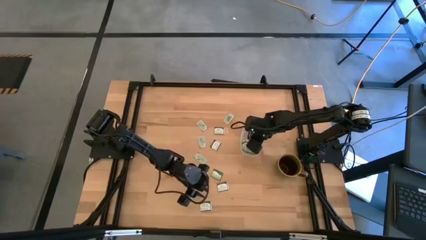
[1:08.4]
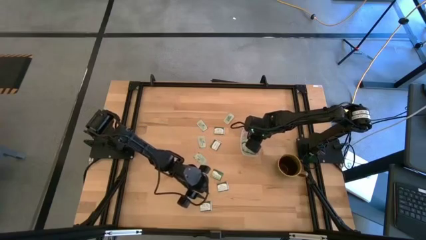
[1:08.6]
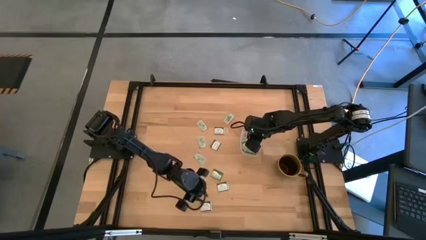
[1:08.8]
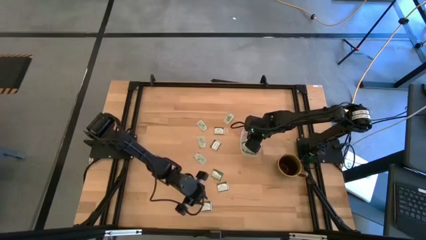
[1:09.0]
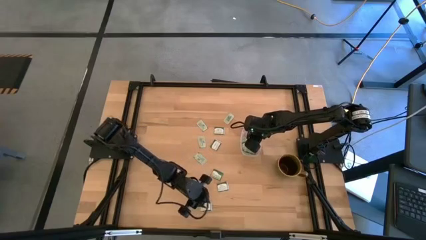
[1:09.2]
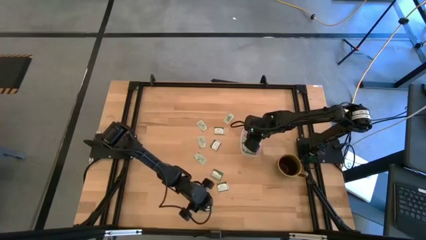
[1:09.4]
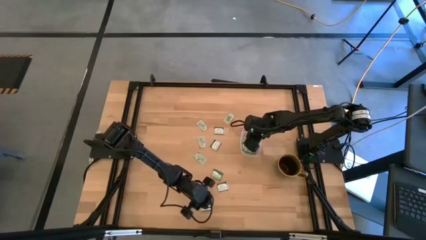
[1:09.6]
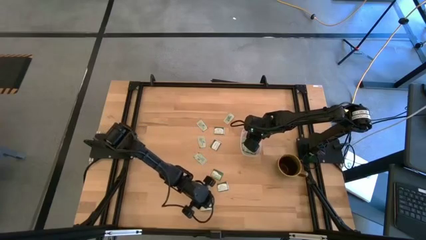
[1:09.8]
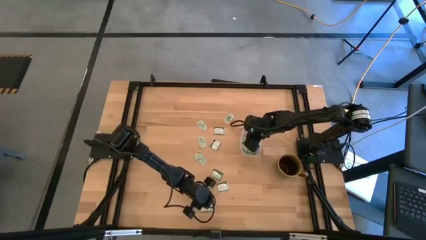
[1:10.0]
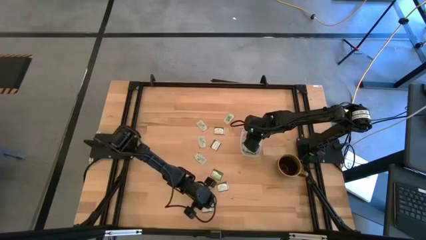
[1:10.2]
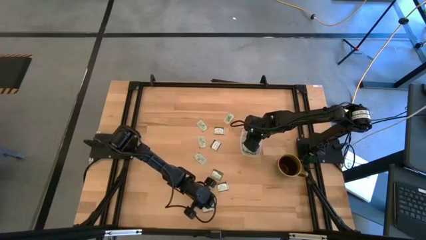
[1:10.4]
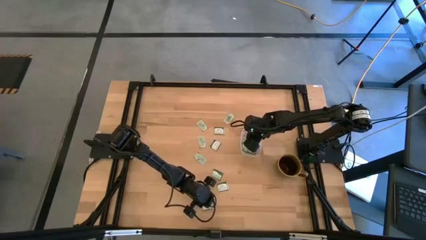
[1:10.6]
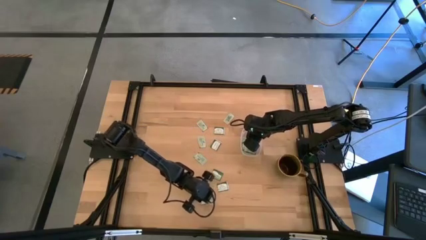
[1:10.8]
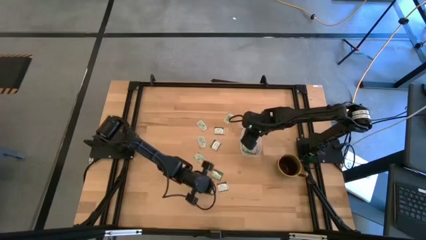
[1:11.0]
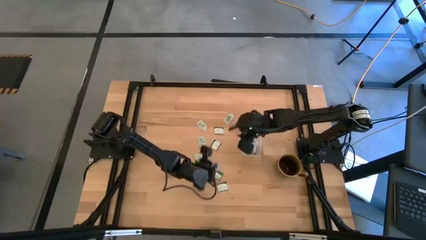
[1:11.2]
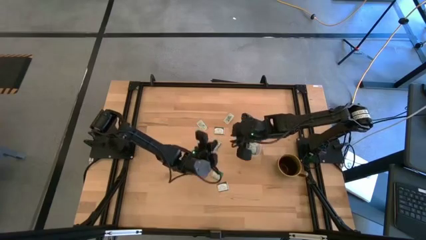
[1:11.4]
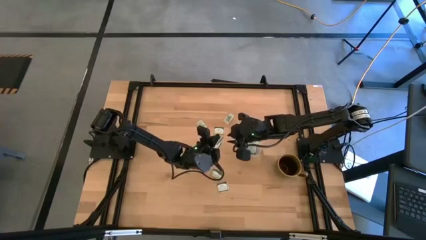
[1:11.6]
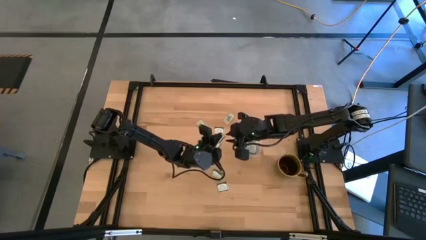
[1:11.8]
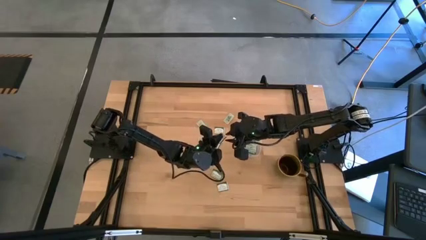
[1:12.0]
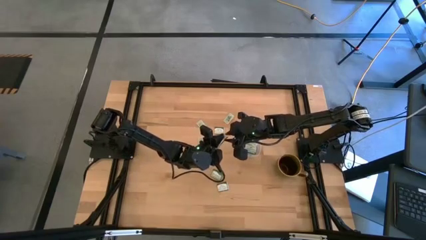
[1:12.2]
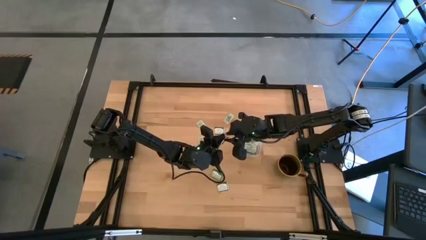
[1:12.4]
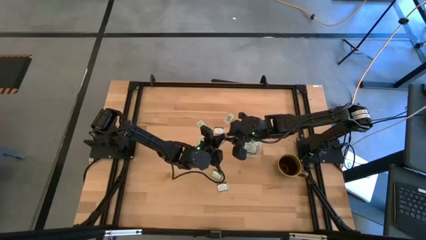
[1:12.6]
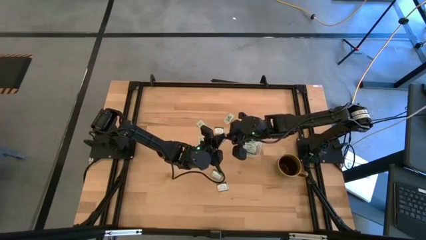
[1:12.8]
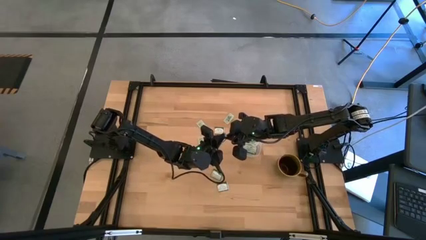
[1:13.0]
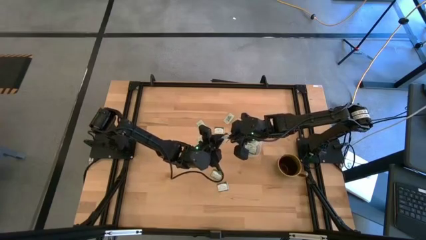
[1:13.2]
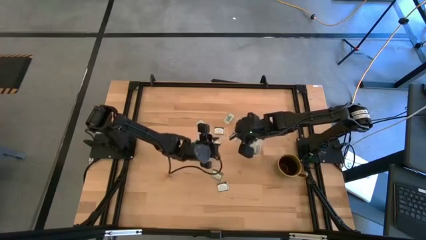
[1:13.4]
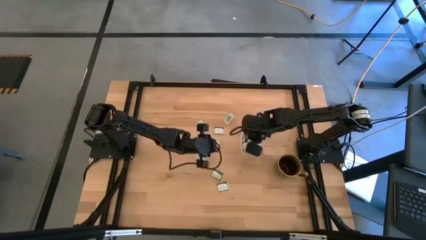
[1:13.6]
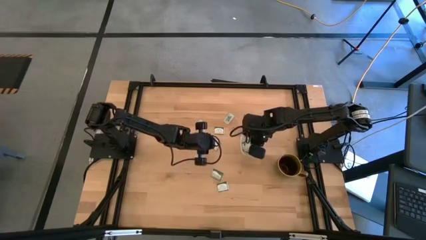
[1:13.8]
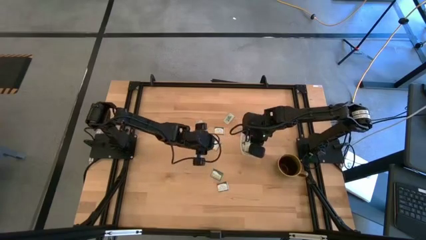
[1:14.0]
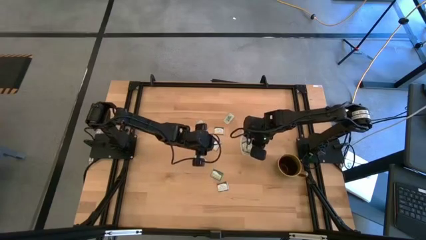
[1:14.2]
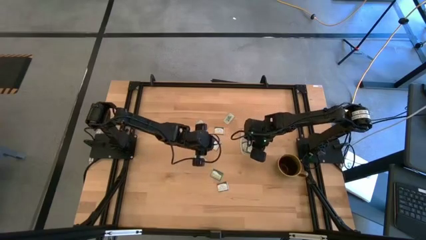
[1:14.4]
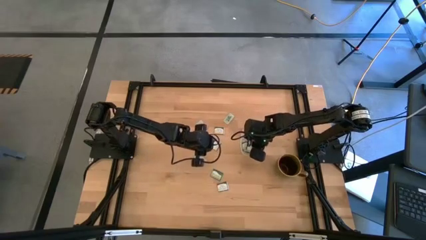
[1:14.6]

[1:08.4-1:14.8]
Task: Pick and place items into bin
Put the truvia packet into the transparent bin

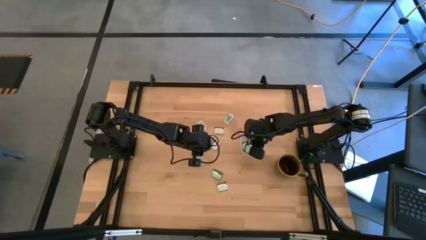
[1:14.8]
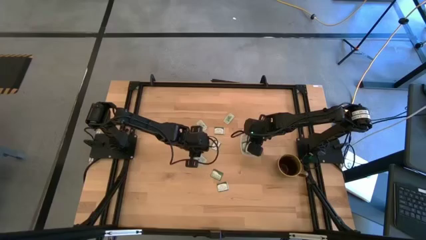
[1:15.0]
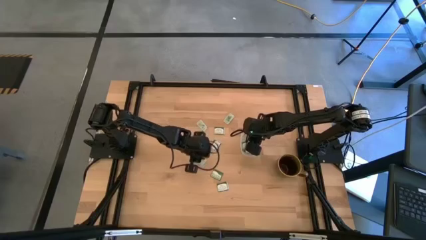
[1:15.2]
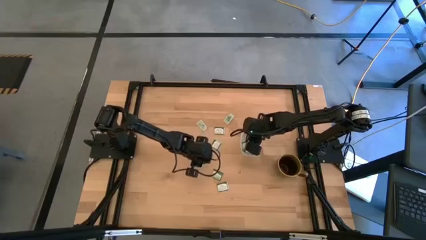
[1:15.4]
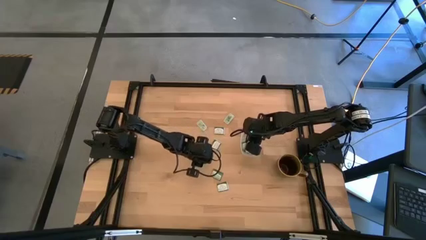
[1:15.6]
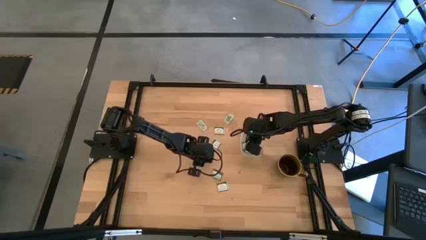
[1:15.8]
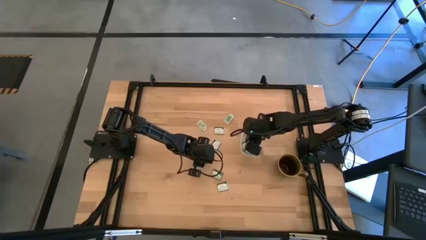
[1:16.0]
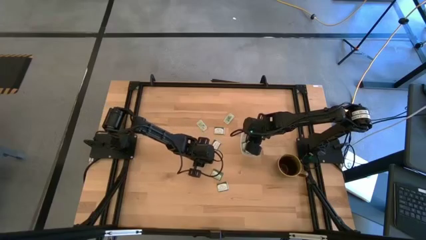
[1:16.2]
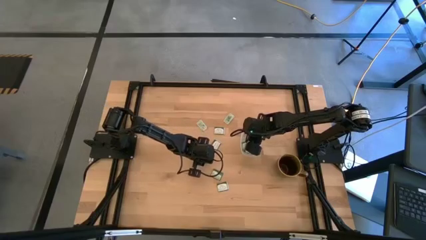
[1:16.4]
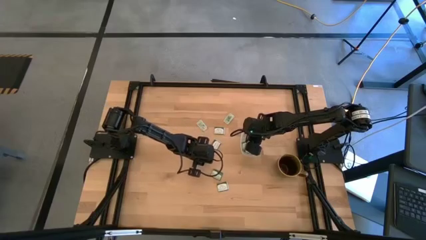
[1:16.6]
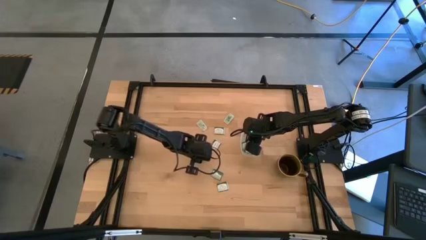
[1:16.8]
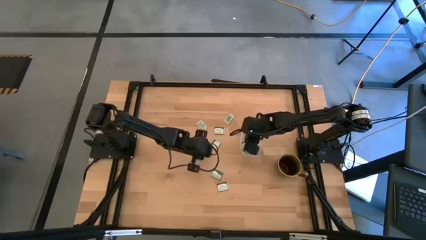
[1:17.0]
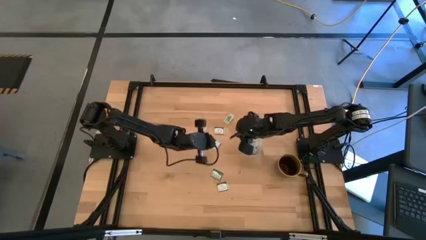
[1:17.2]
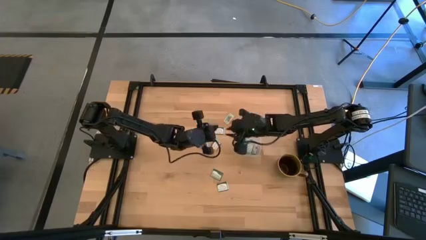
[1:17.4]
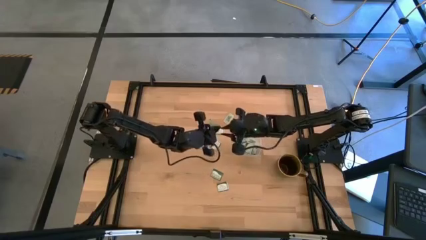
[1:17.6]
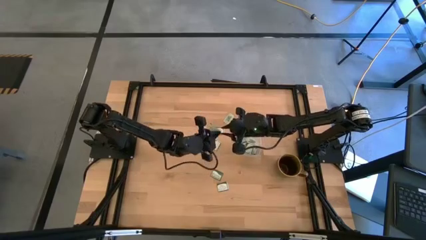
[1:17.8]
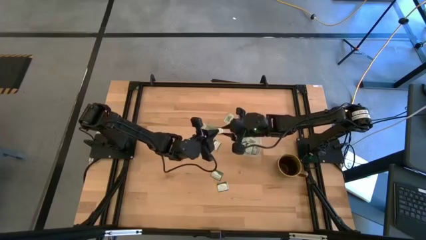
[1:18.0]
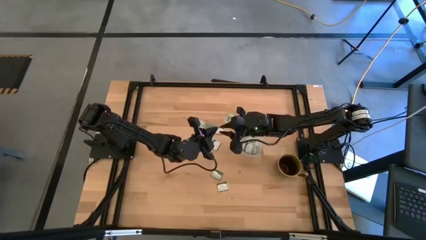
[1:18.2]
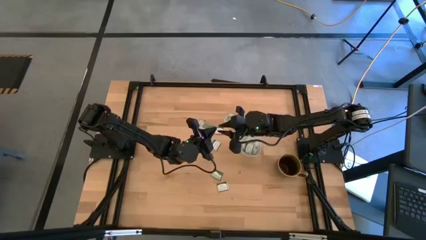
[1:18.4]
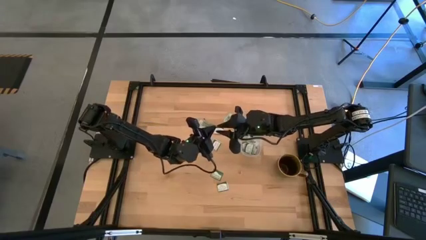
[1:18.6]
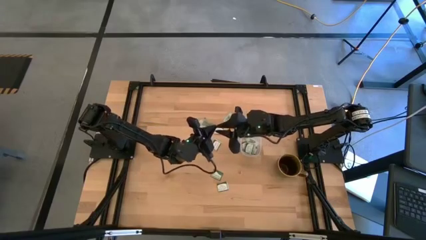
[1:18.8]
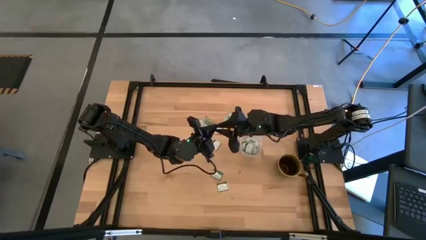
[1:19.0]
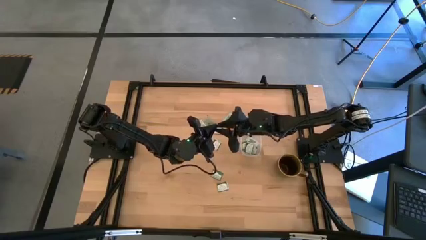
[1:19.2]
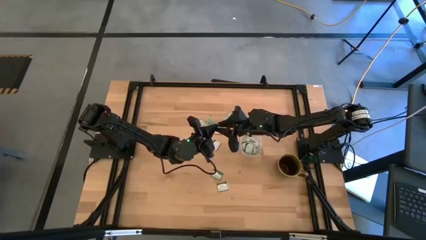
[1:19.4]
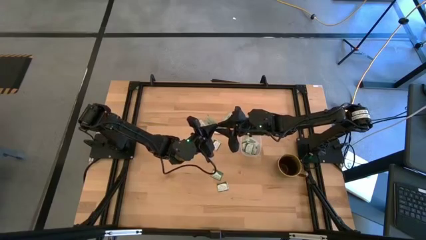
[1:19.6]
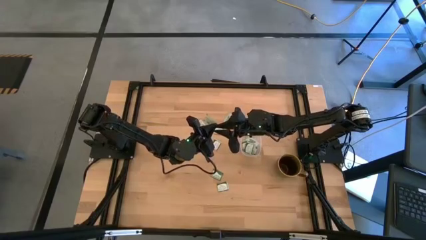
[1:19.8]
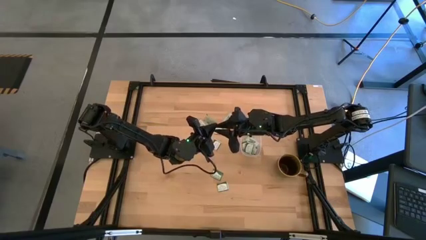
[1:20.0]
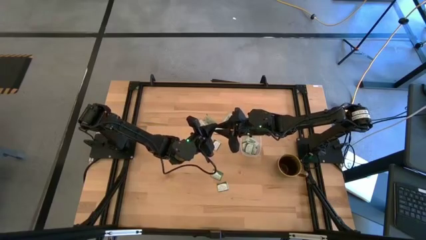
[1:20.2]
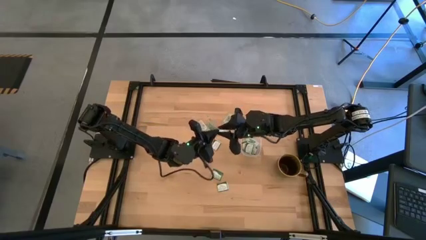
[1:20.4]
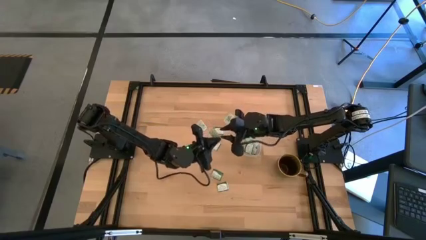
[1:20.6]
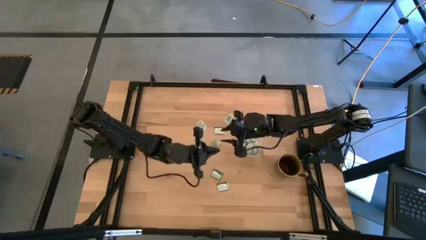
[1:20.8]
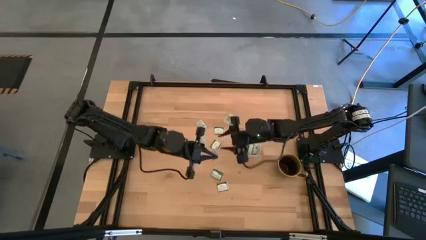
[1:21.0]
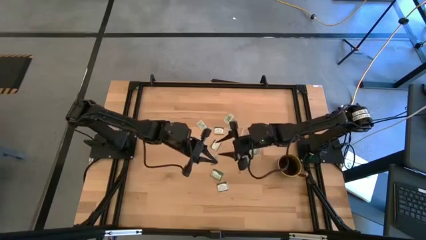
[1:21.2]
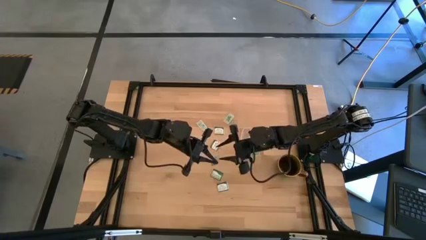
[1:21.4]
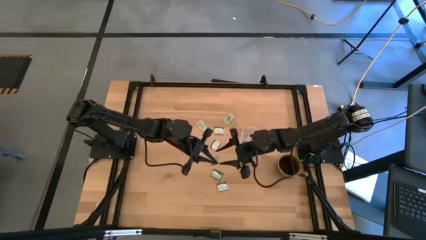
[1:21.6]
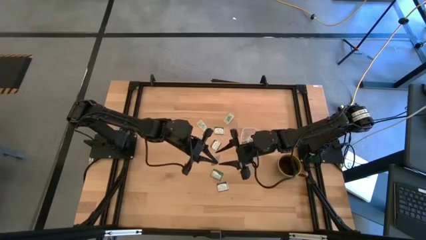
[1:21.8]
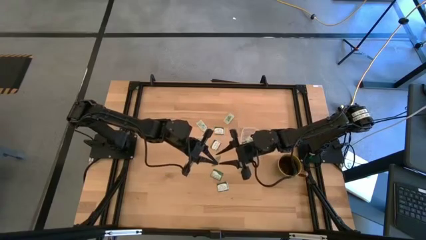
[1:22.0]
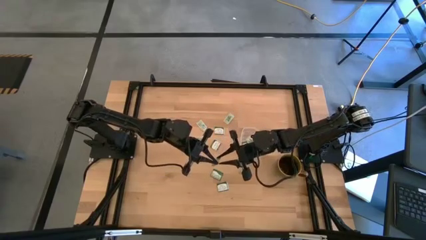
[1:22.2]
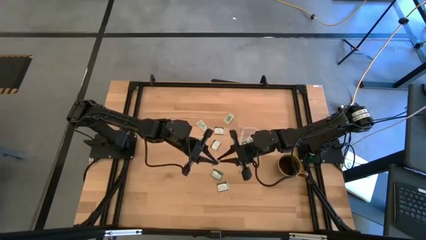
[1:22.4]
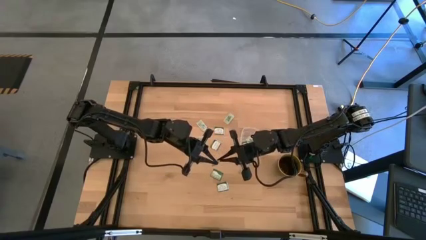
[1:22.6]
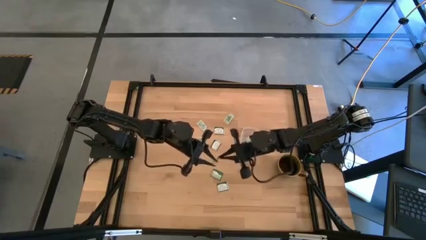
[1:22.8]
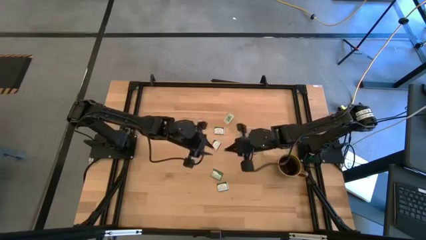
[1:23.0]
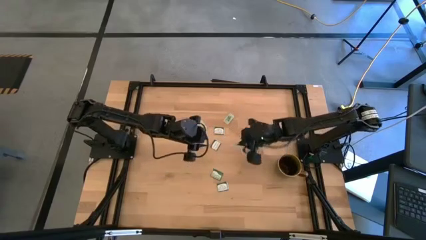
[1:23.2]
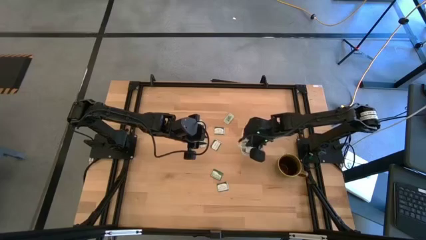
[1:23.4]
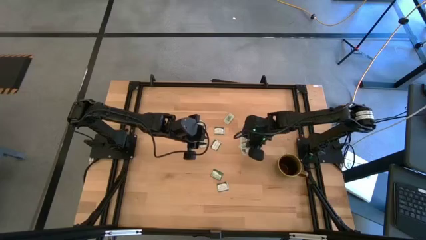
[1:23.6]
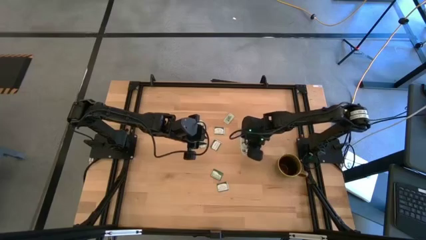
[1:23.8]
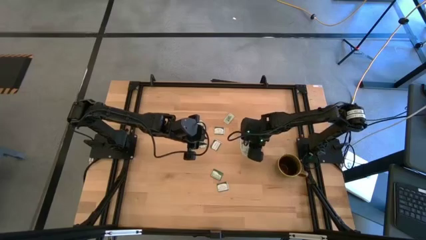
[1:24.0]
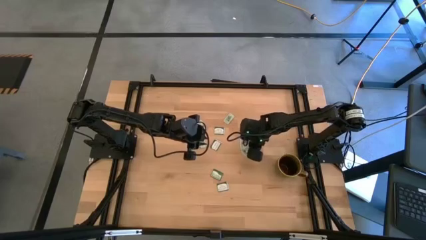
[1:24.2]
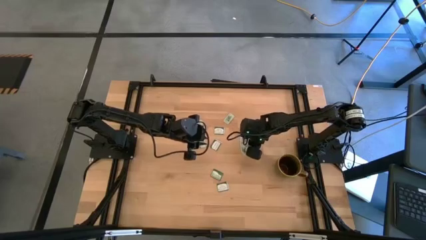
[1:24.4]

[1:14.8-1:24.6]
Put the stevia packet into the transparent bin
